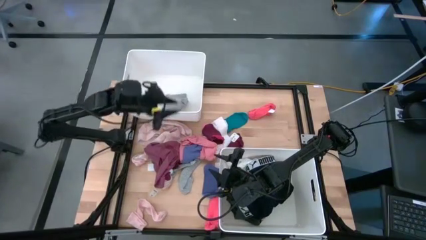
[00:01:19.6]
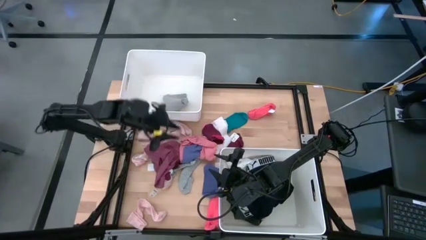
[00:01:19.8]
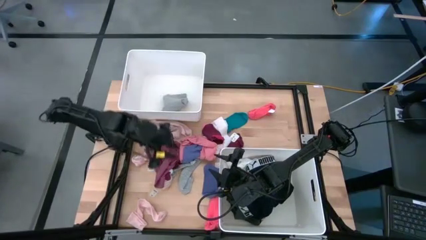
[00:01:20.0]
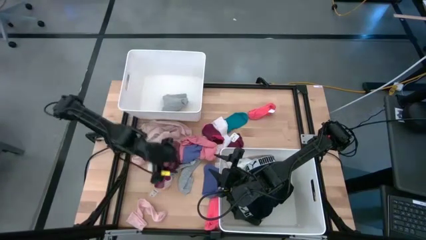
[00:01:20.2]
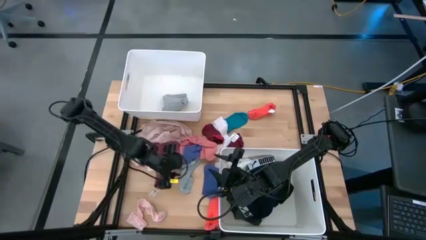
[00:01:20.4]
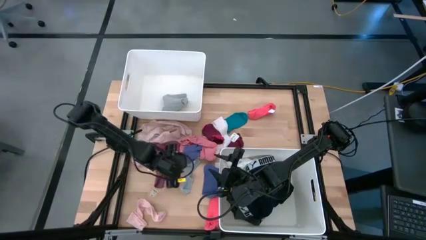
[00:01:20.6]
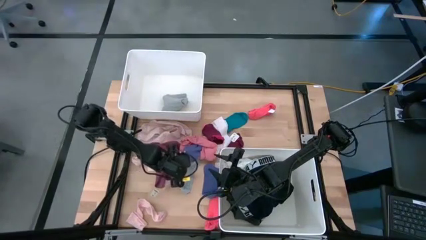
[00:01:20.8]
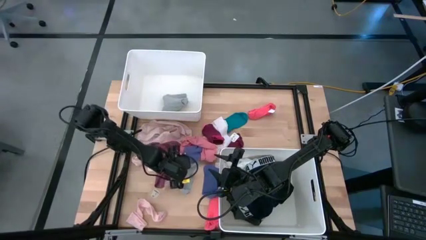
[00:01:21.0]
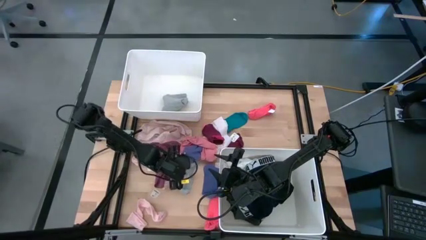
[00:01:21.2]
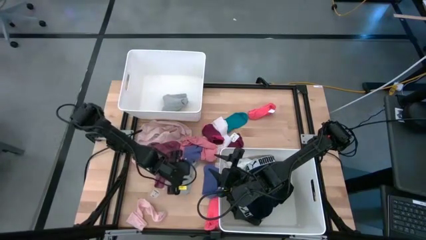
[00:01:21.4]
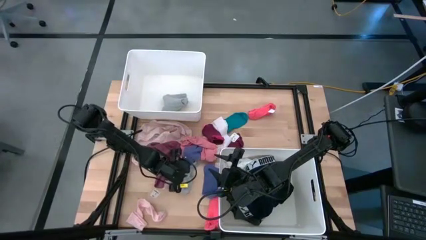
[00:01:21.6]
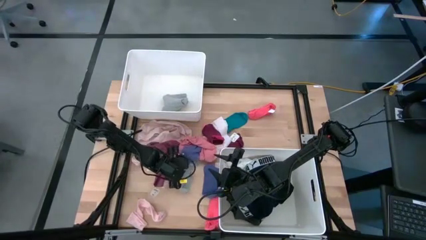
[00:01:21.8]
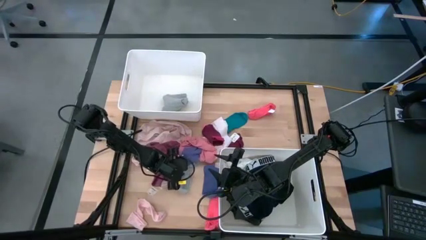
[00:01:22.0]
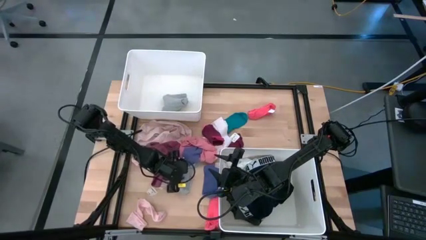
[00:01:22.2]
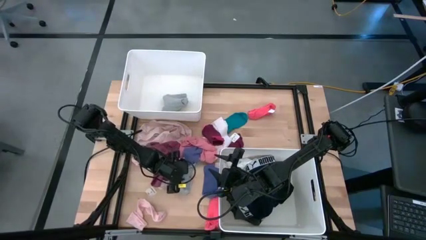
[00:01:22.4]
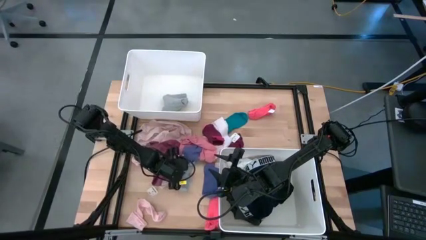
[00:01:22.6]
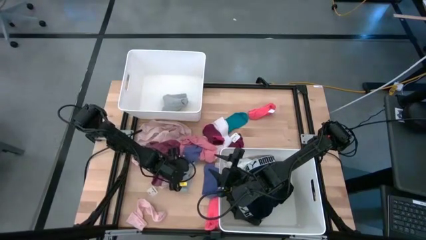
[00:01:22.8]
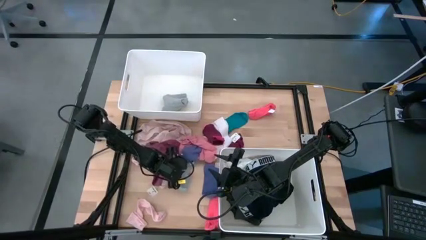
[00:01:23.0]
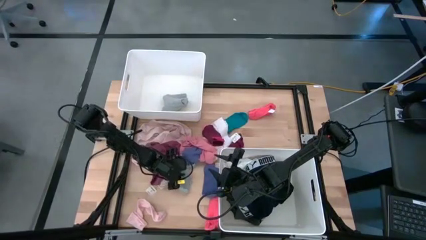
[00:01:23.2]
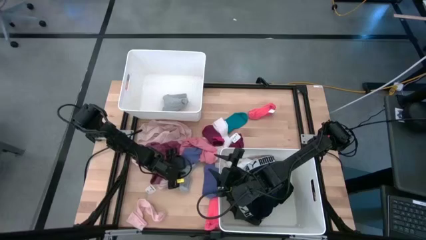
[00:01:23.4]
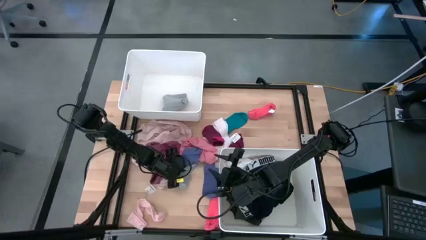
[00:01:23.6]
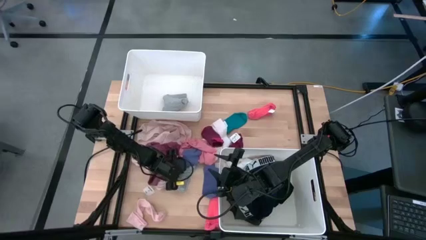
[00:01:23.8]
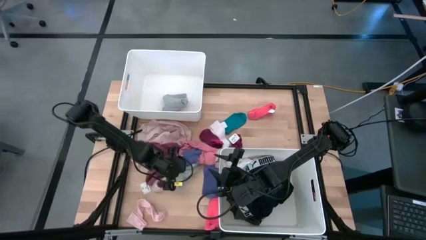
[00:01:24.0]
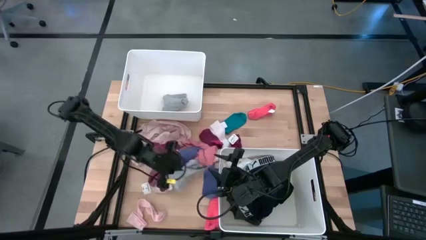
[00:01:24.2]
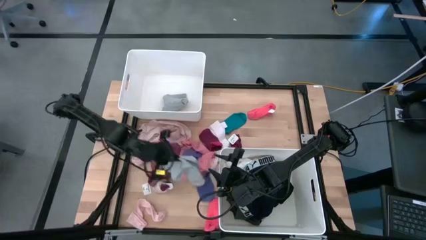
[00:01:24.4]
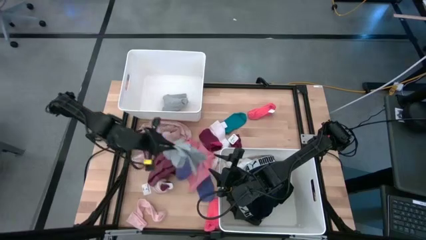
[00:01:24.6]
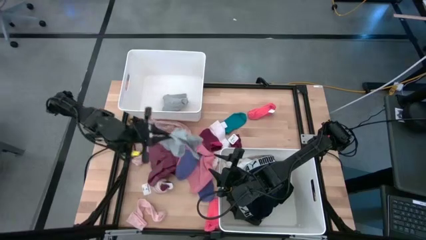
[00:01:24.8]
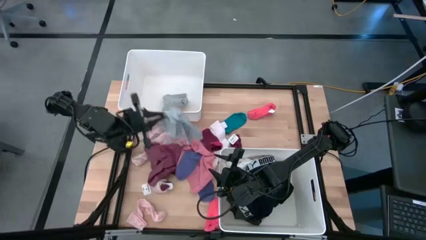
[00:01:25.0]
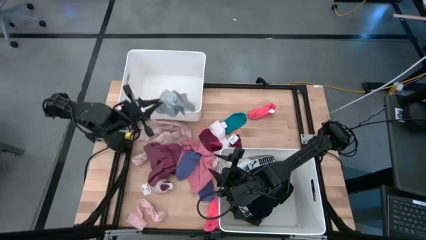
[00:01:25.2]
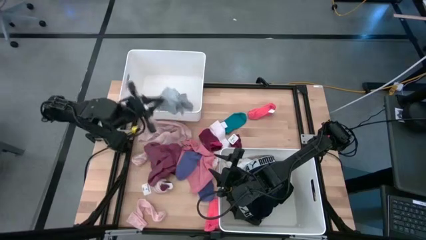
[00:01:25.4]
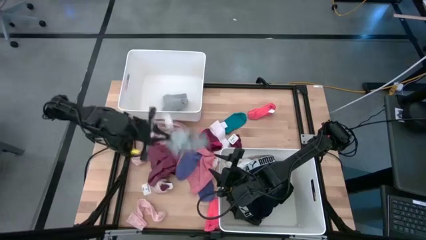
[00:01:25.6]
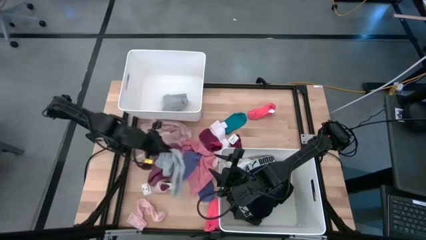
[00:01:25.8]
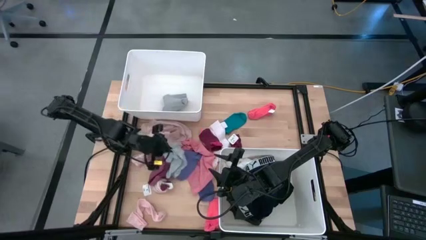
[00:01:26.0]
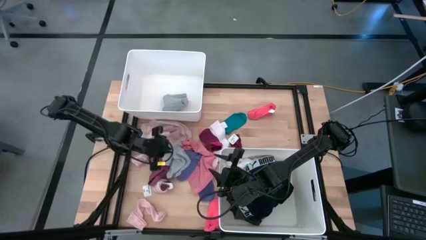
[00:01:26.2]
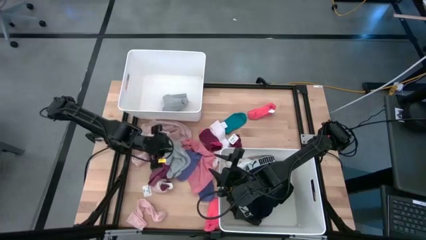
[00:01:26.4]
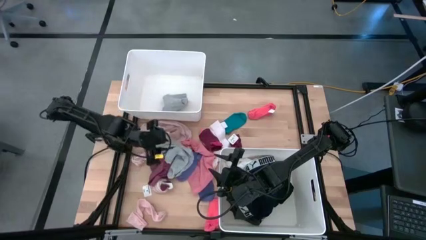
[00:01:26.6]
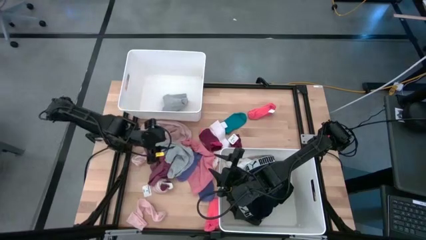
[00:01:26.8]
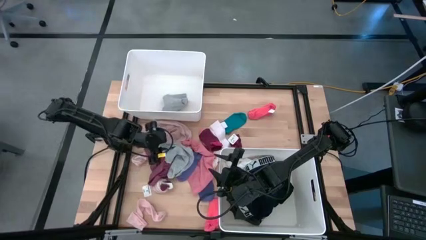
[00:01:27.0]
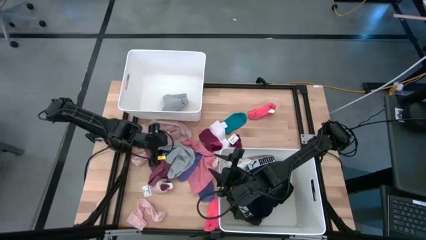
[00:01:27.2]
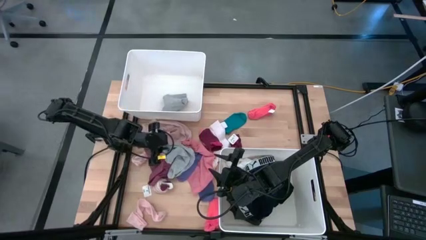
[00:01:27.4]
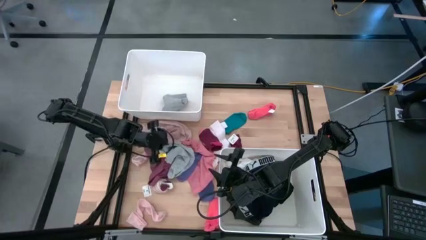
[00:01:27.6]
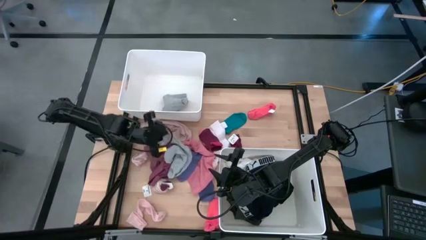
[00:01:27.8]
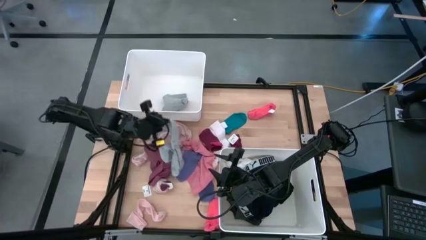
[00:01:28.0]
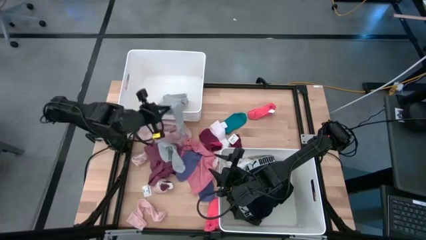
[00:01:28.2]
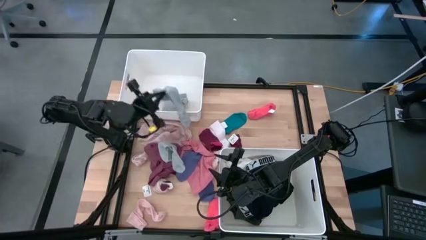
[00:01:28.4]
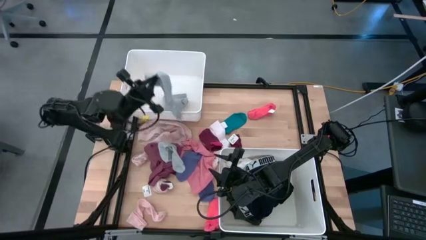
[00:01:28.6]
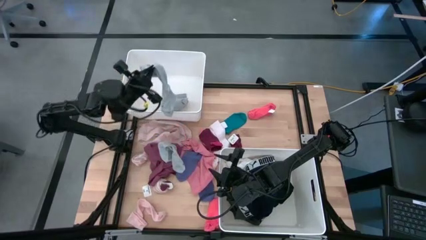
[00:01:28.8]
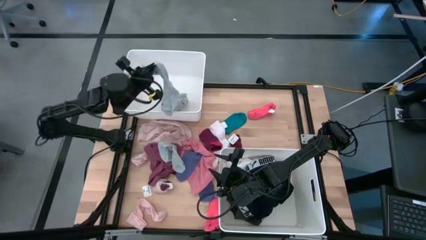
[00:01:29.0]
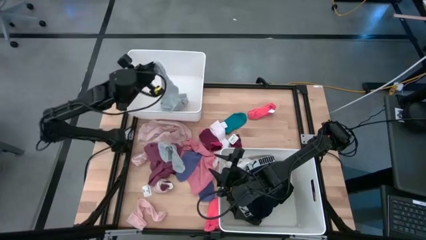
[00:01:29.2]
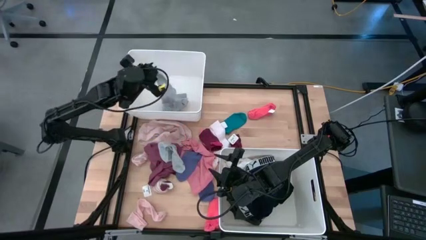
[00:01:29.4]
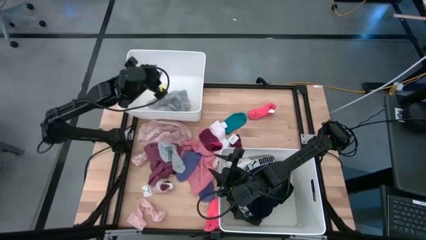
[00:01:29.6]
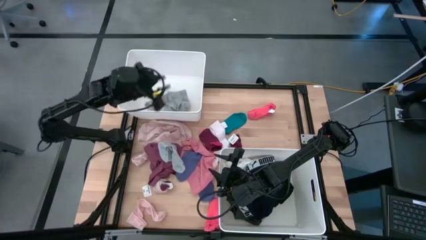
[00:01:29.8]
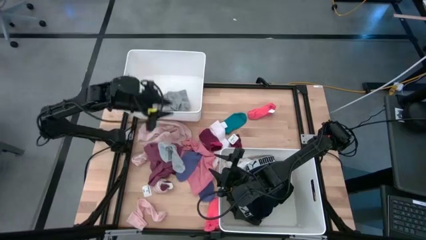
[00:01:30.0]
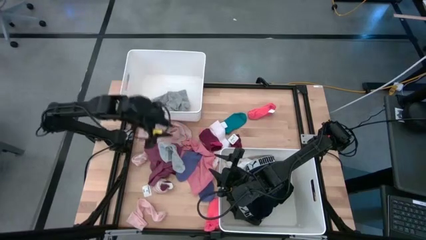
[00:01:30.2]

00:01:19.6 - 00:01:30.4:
Task: Sort clothes
Put the gray sock into the top white bin

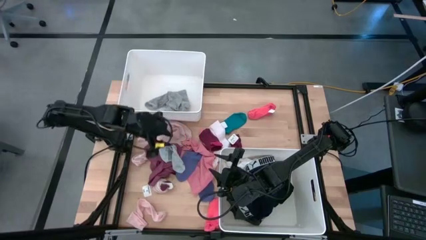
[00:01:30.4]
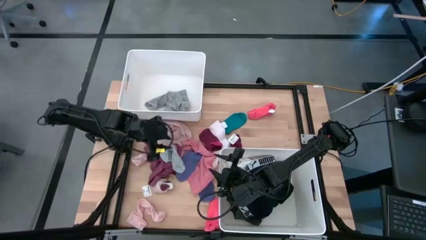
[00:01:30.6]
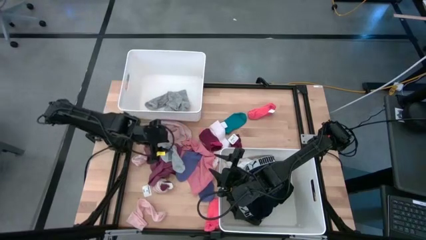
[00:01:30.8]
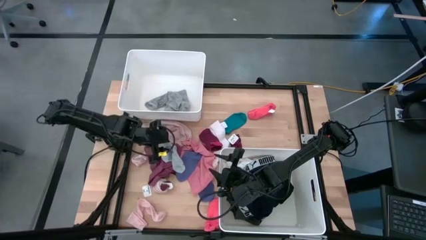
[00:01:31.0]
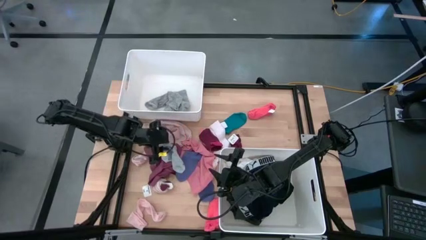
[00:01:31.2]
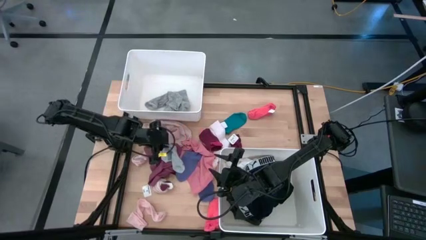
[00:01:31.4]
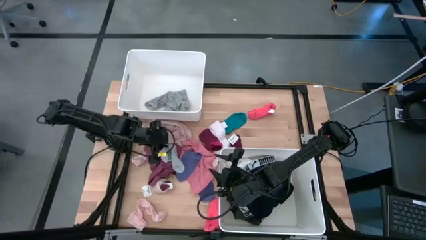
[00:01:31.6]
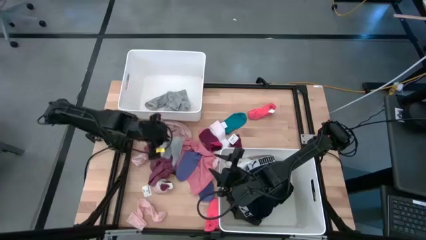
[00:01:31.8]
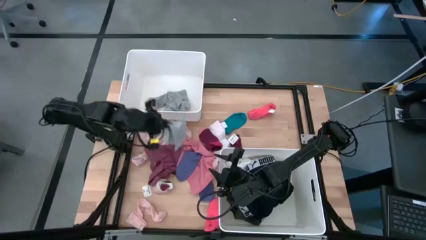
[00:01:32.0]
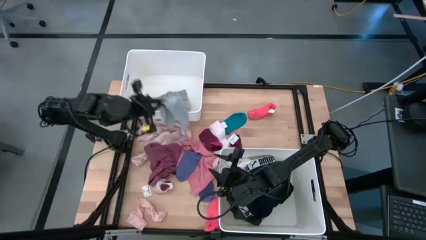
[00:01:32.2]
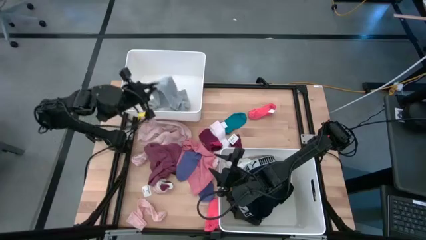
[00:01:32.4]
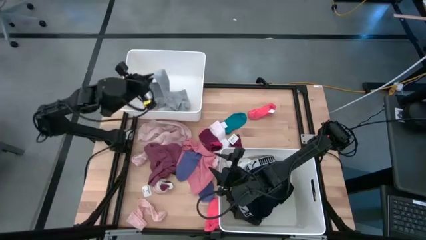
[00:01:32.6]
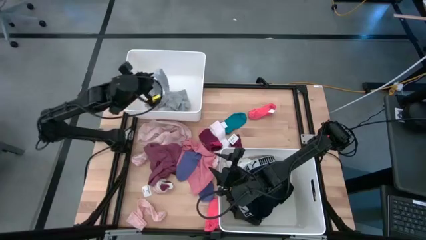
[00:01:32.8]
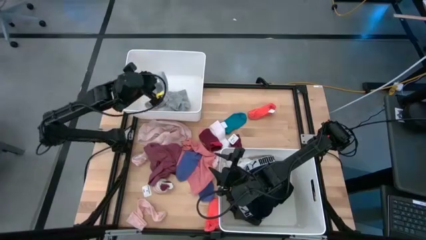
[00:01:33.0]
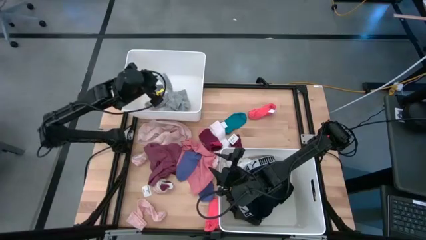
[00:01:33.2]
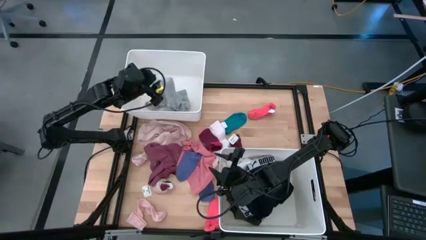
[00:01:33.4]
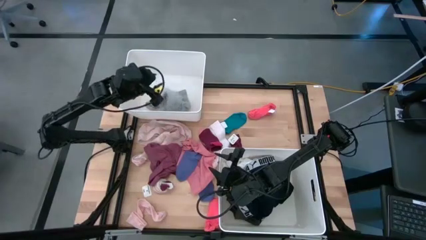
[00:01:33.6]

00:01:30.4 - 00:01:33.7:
Put the gray sock into the top white bin
